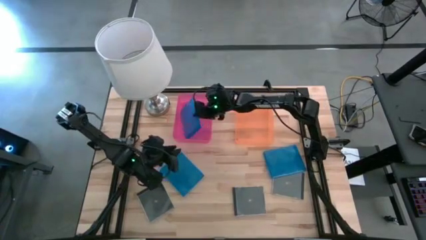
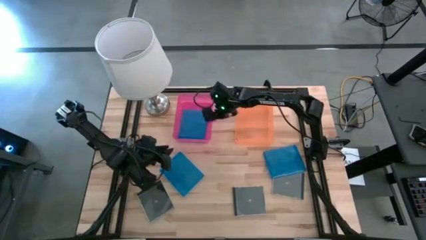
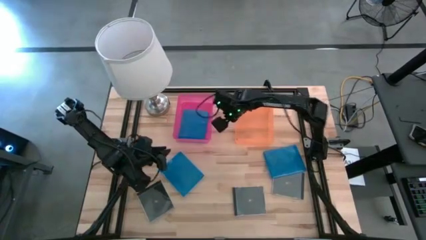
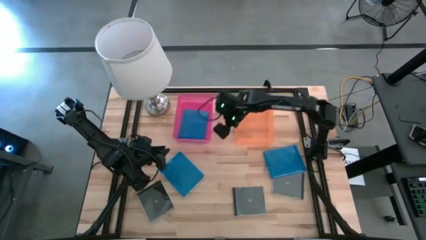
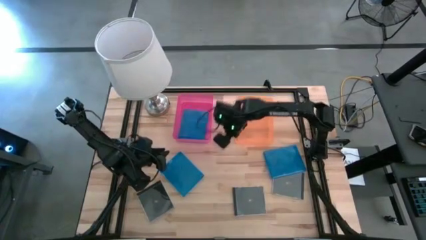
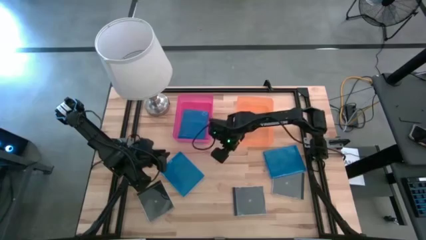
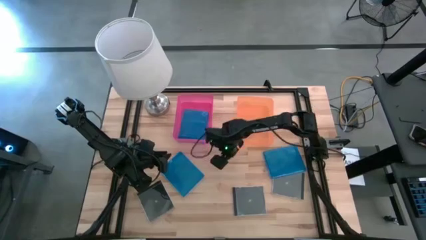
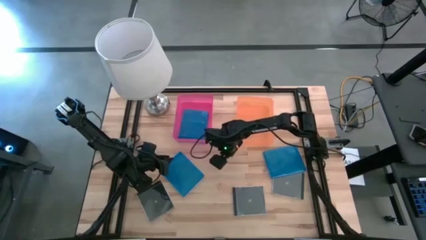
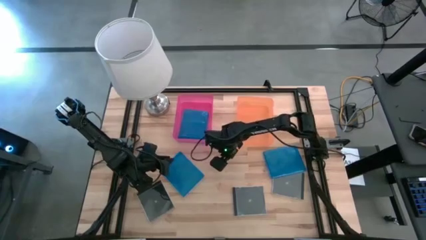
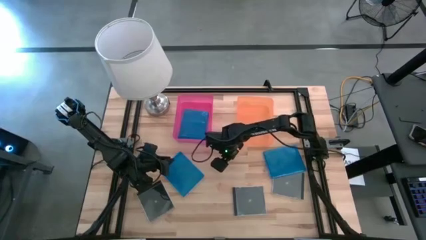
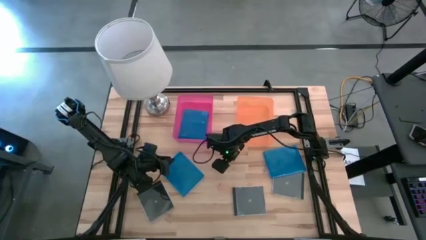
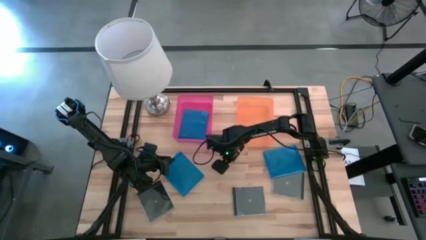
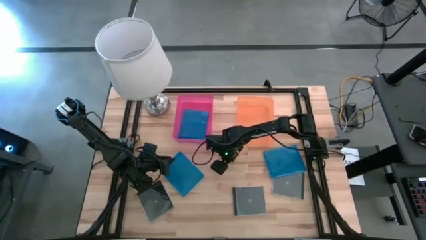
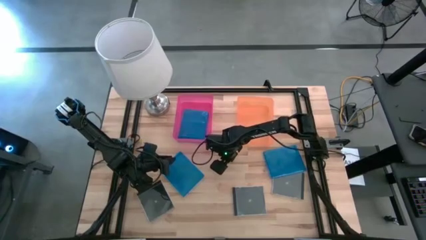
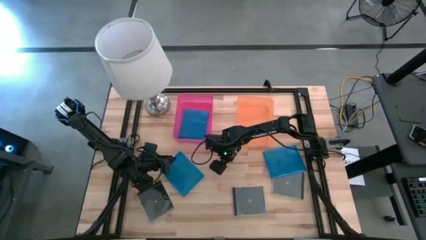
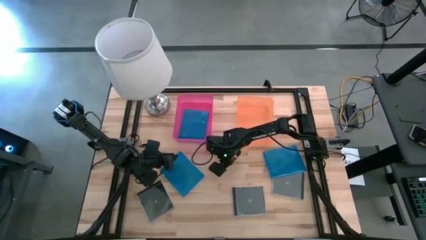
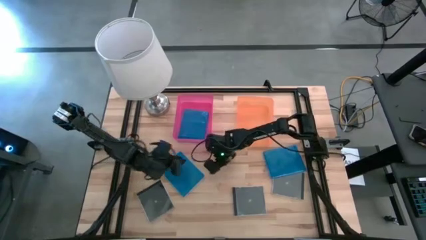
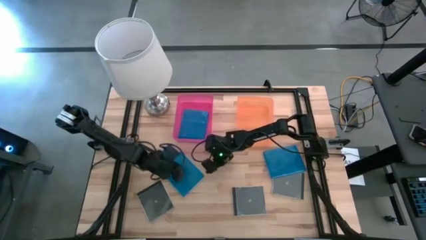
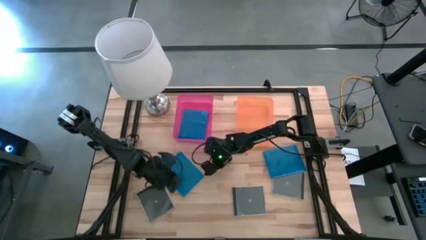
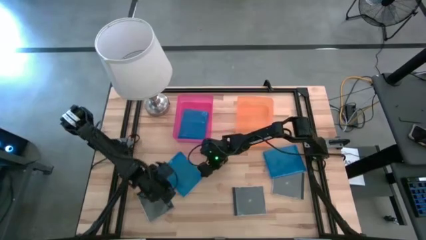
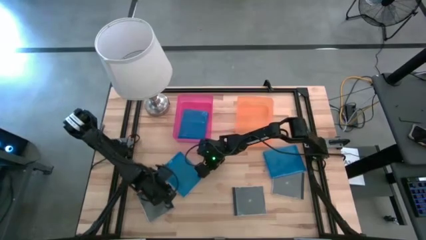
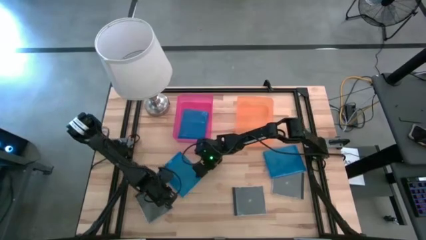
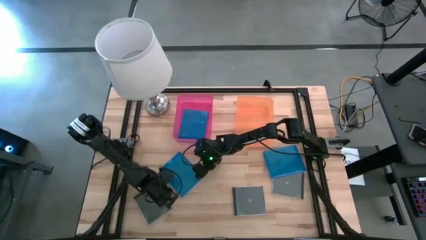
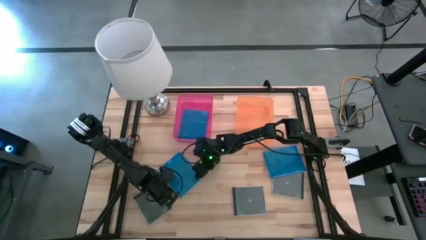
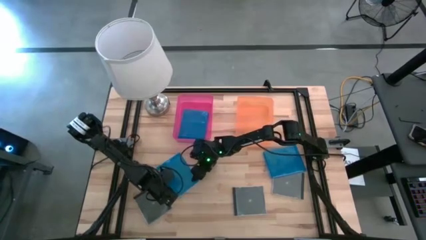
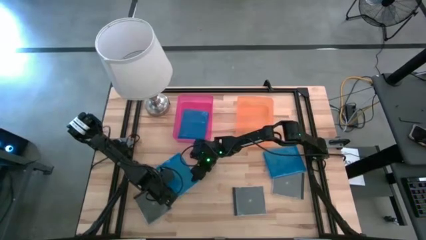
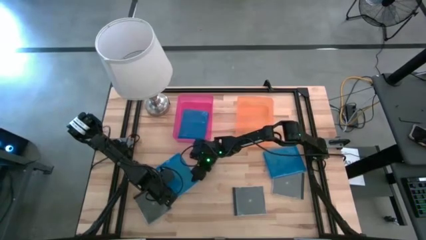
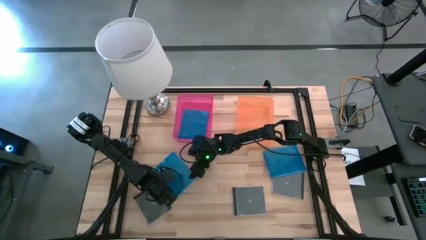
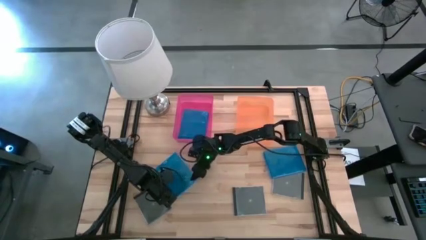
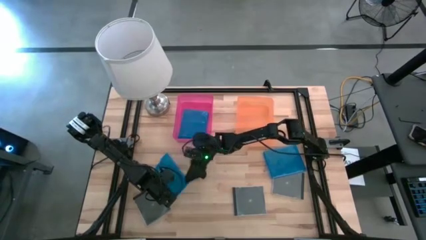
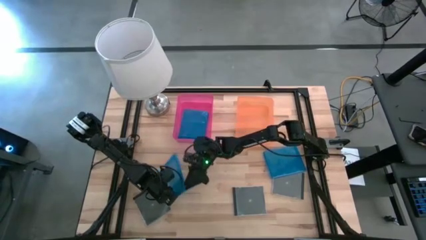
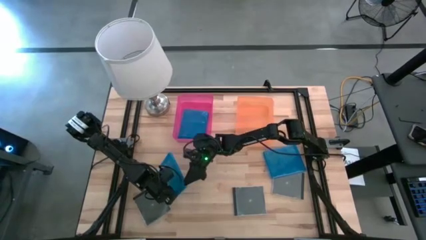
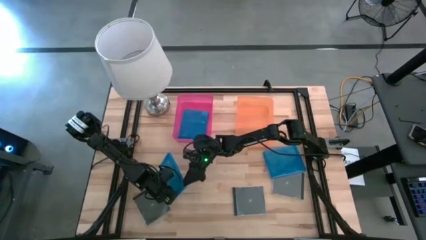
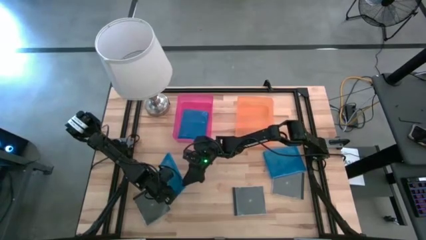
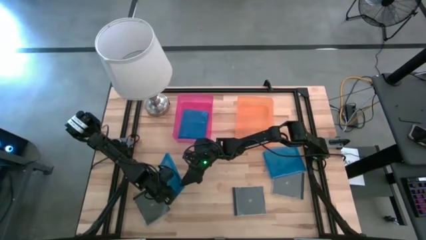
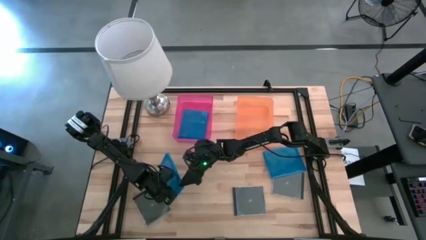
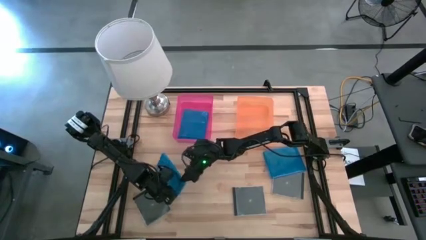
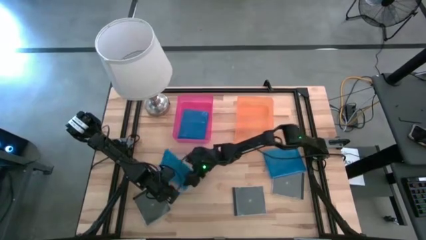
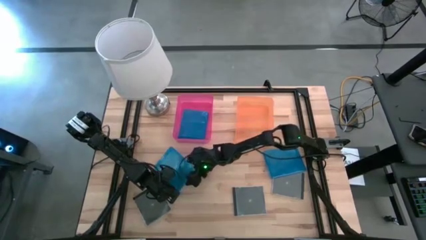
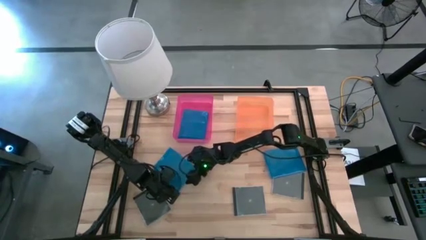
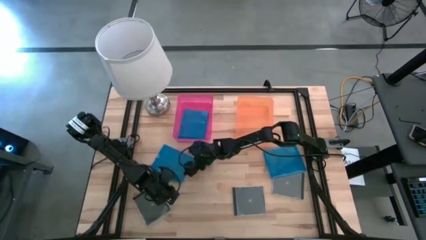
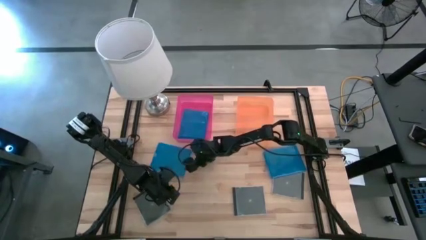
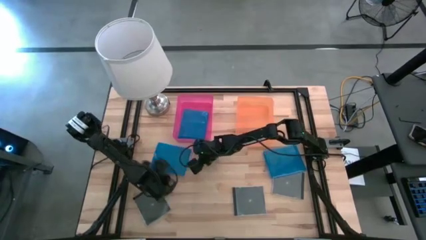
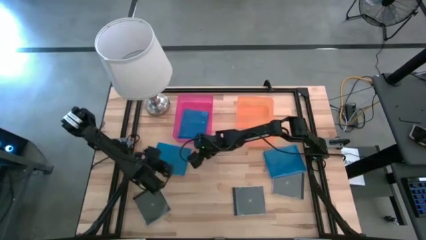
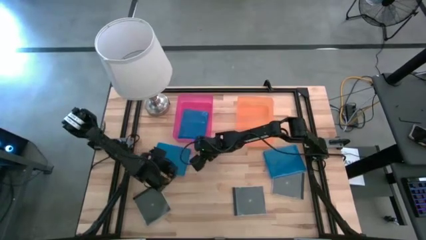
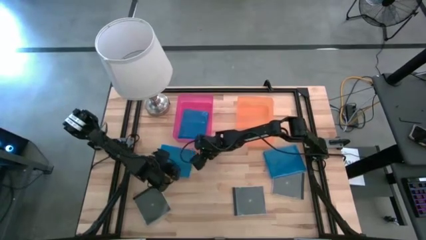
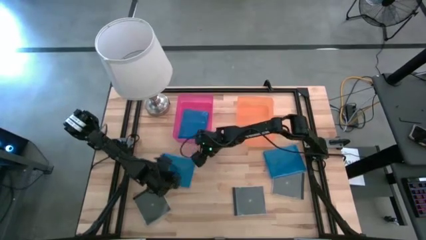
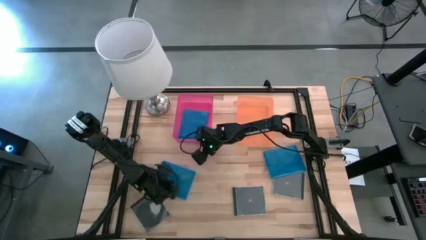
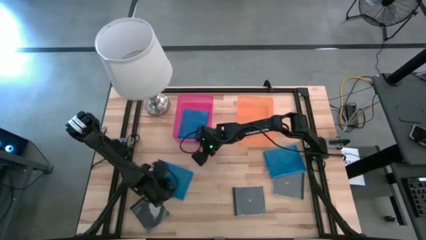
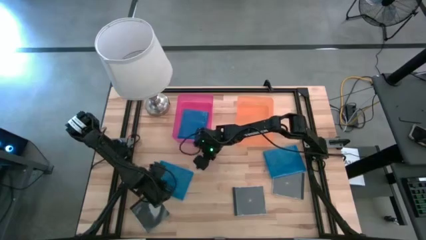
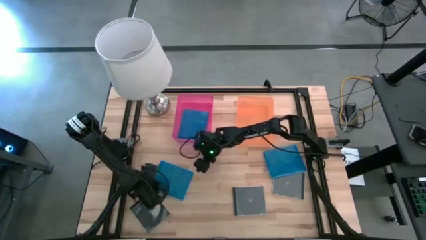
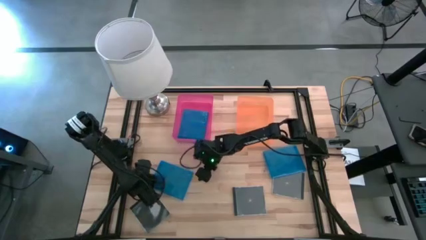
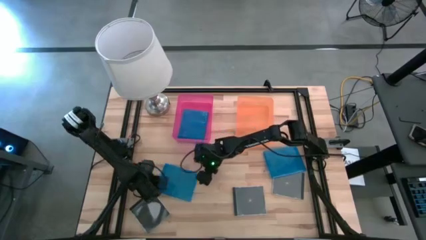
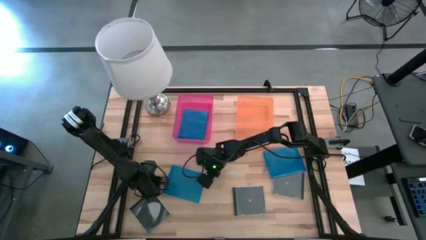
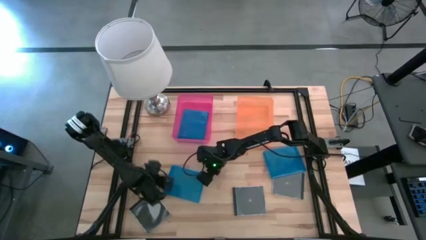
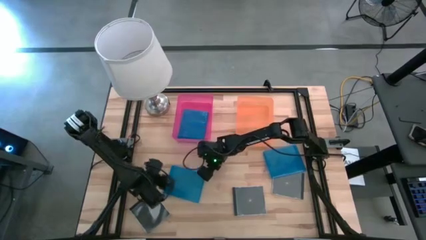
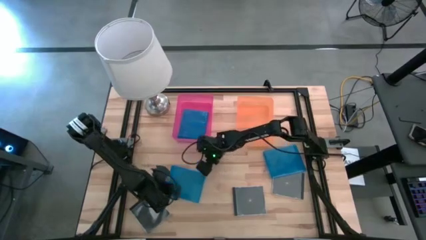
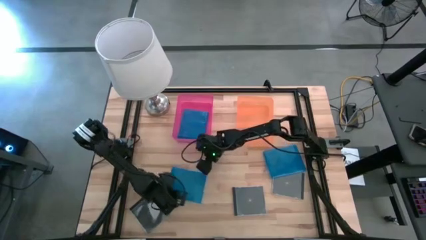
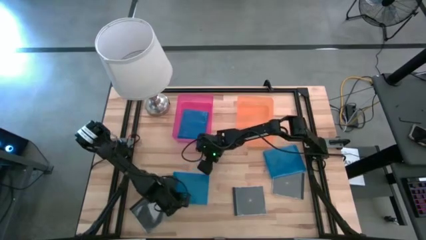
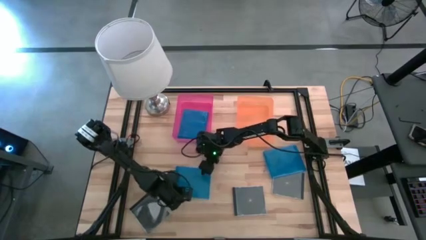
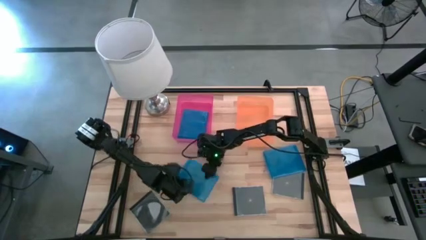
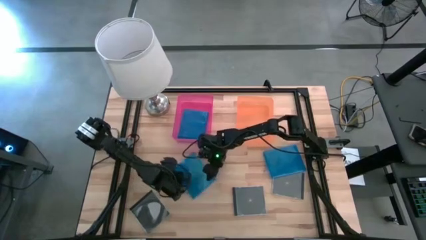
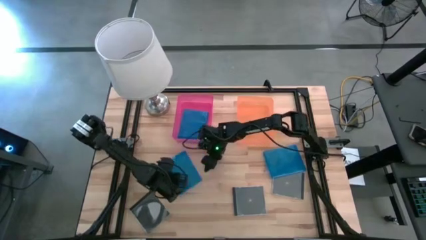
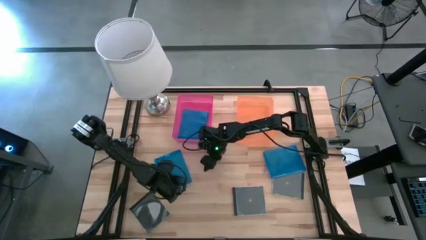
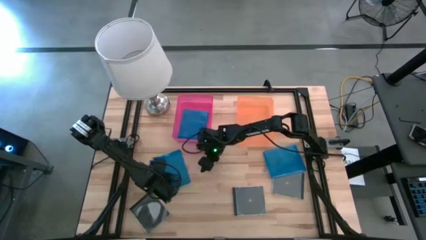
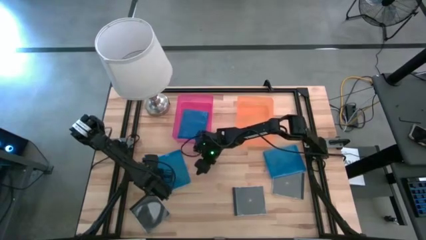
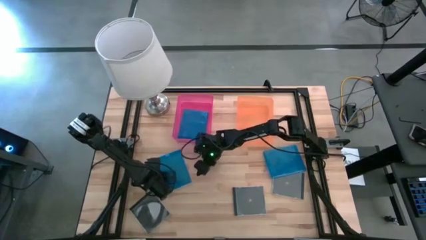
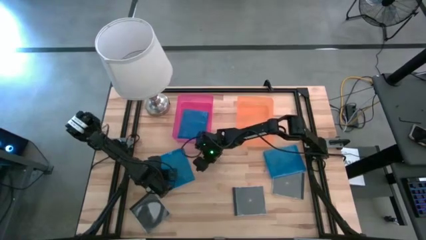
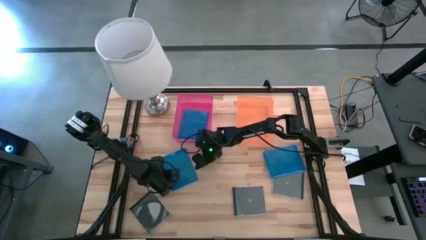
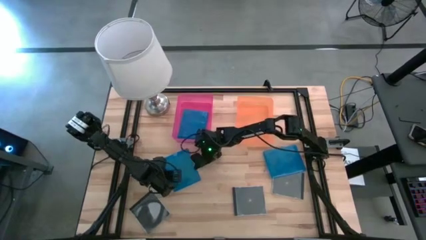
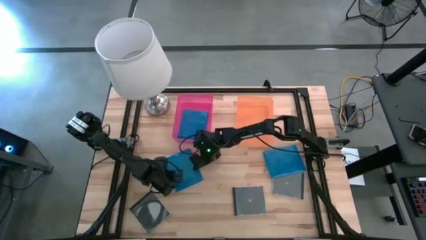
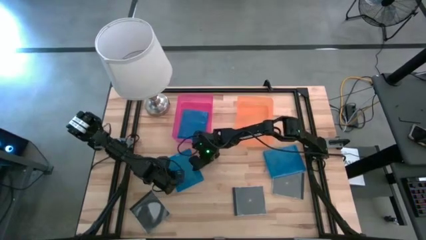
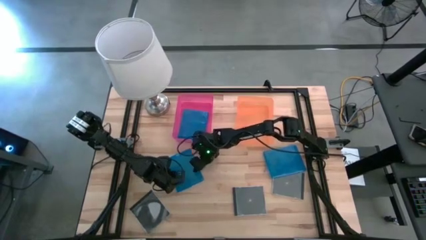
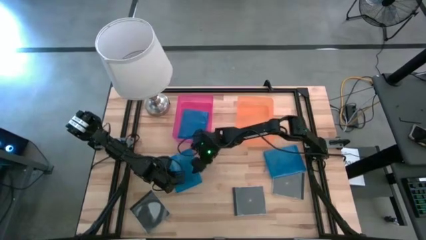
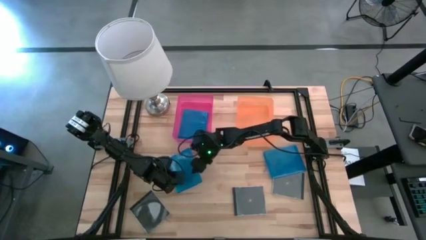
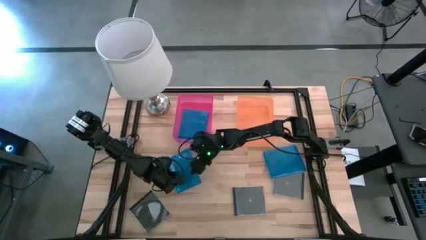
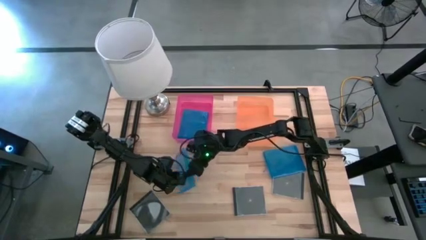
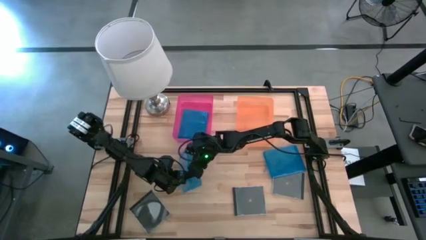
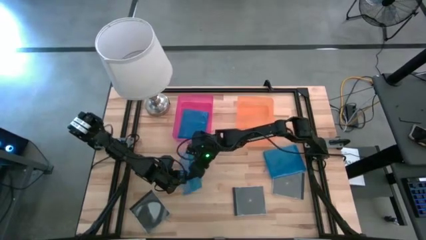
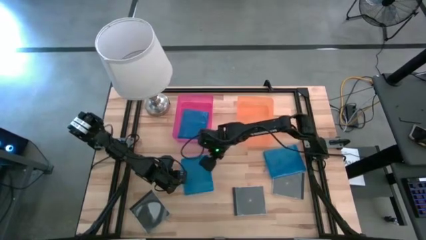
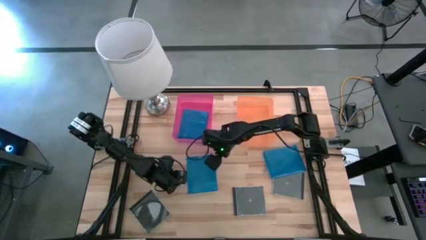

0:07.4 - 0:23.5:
Task: Pick & place jewel cases by type
Put the left blue cd case into the pink bin

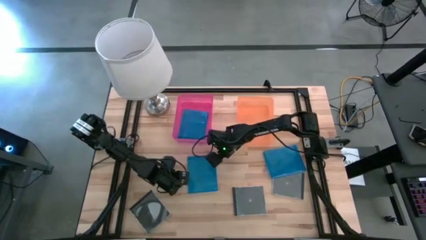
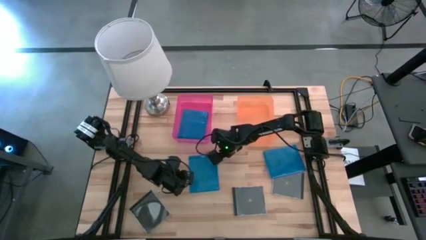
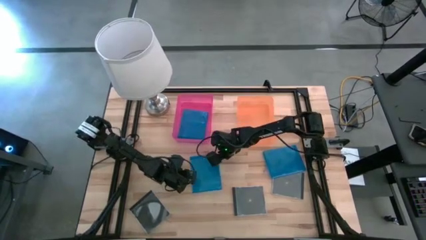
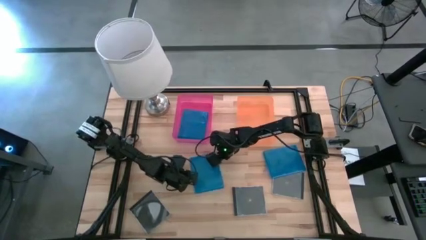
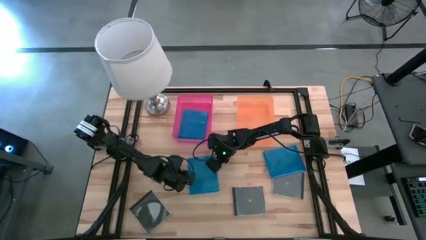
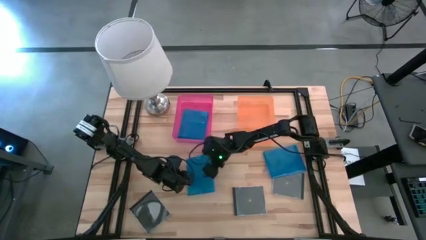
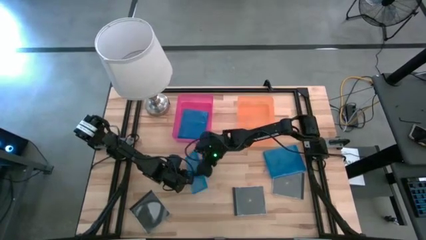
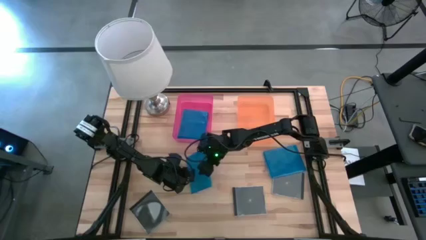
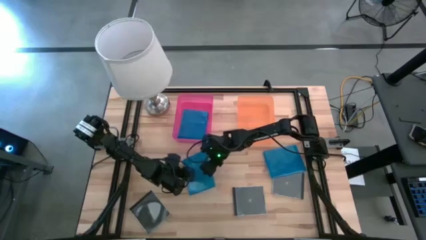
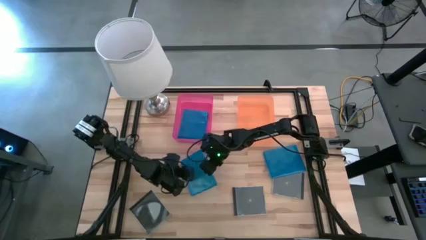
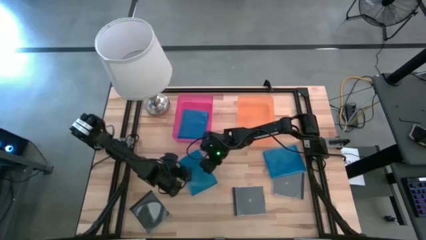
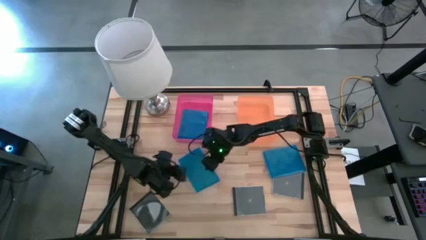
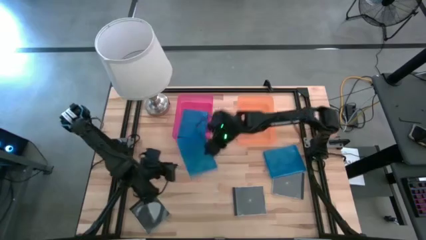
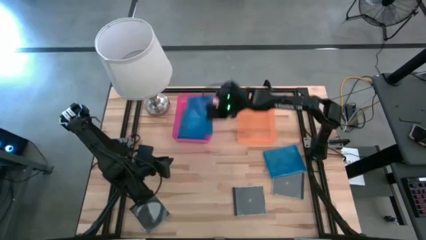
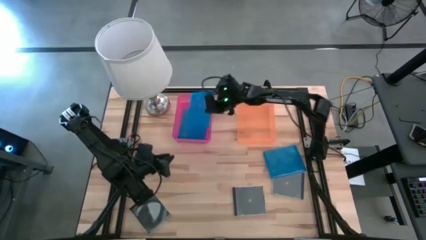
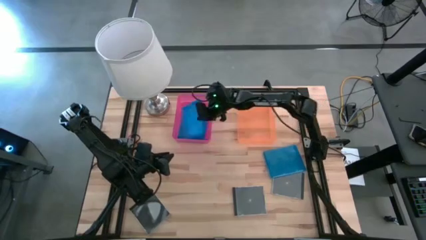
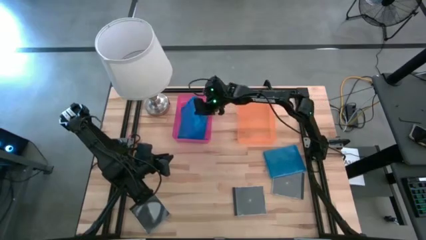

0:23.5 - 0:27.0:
Put the left blue cd case into the pink bin
